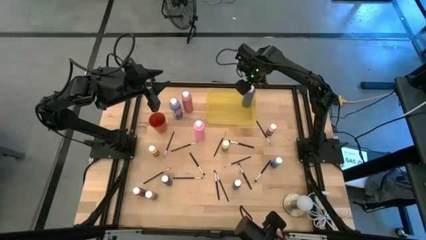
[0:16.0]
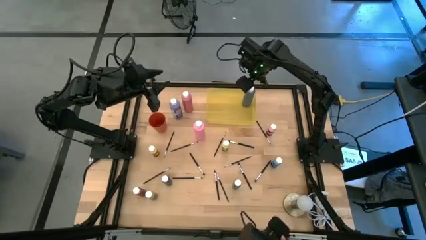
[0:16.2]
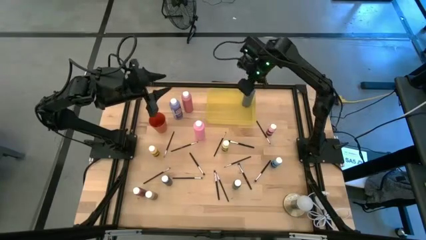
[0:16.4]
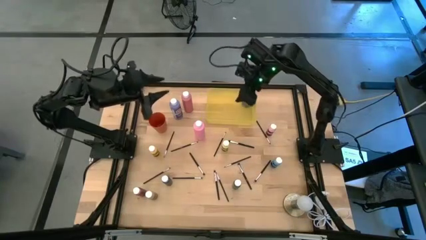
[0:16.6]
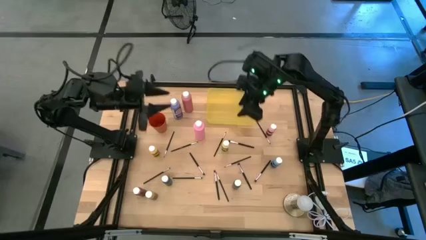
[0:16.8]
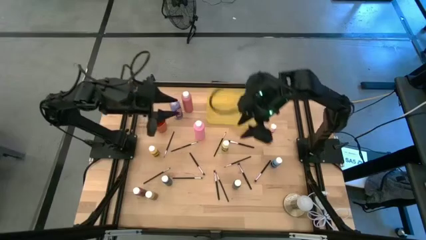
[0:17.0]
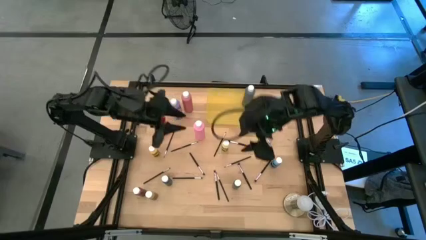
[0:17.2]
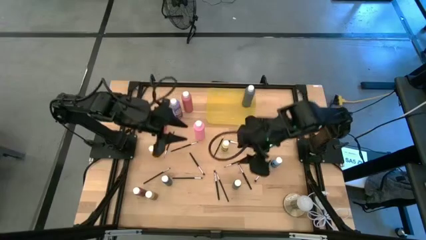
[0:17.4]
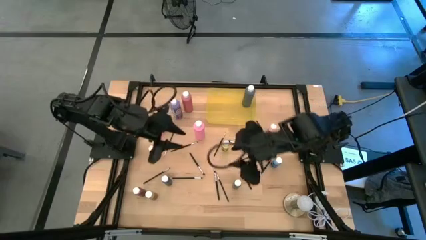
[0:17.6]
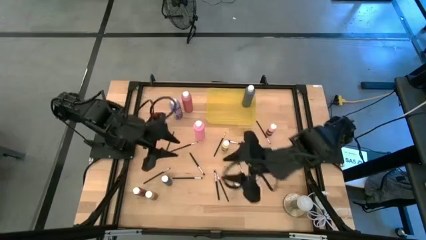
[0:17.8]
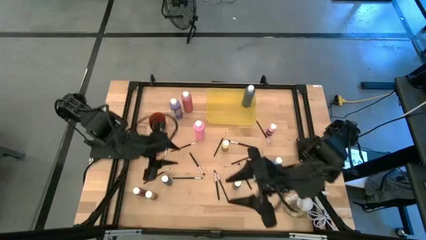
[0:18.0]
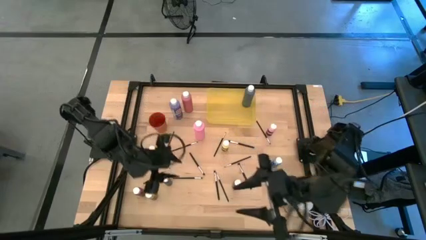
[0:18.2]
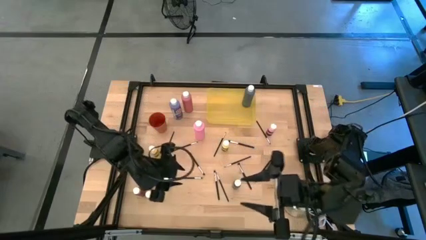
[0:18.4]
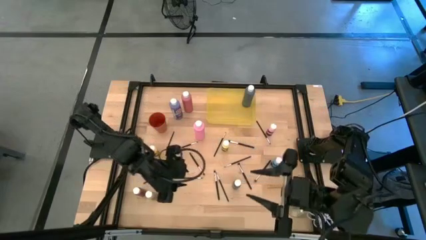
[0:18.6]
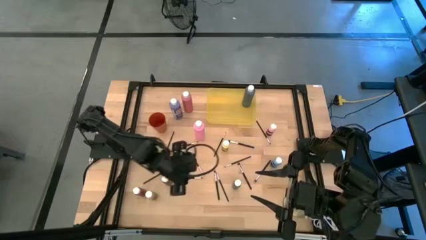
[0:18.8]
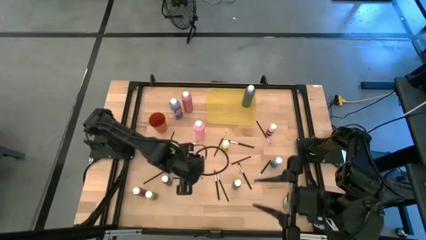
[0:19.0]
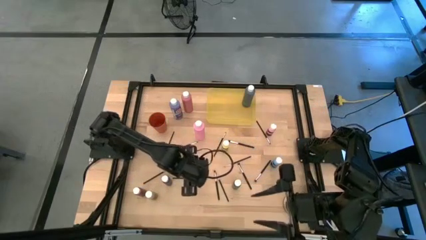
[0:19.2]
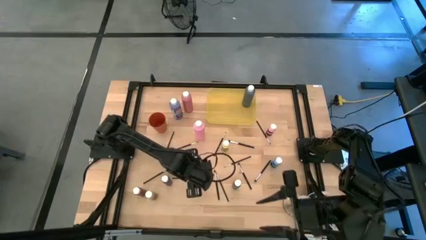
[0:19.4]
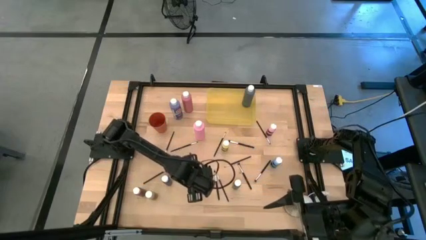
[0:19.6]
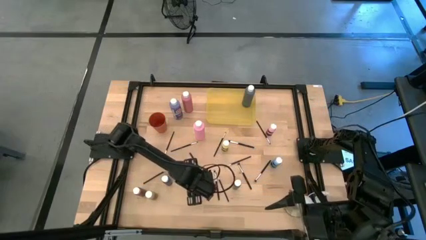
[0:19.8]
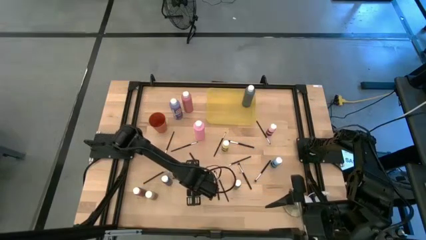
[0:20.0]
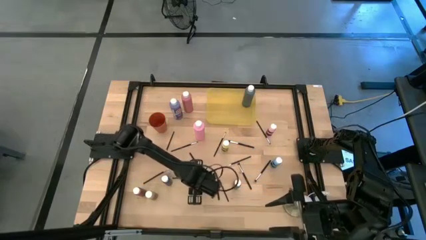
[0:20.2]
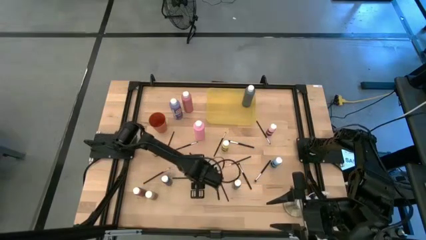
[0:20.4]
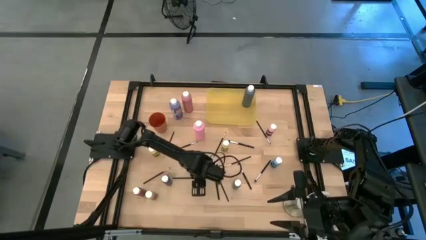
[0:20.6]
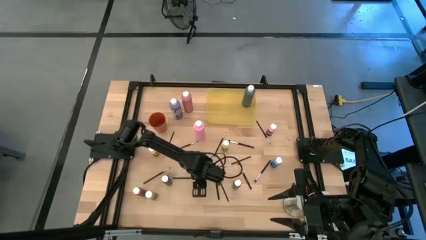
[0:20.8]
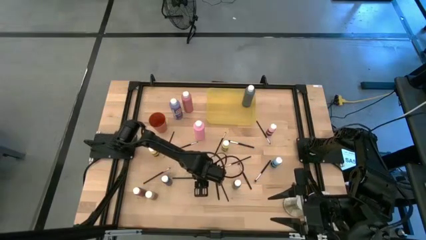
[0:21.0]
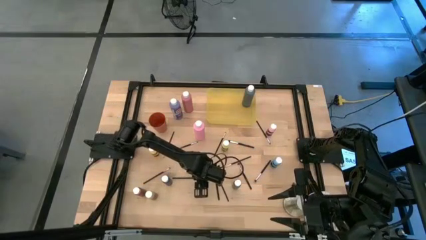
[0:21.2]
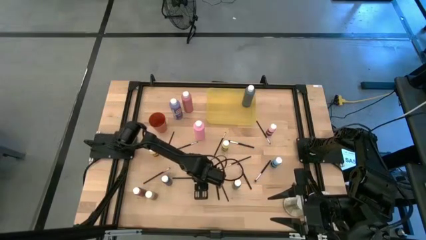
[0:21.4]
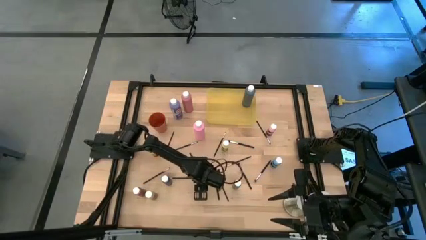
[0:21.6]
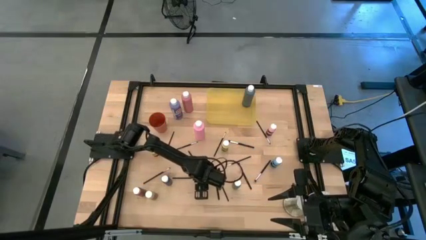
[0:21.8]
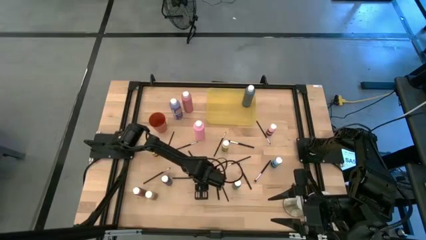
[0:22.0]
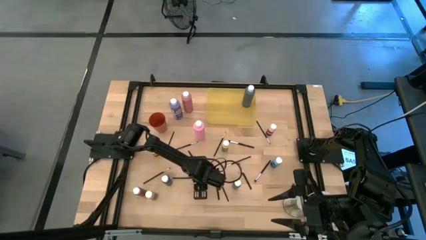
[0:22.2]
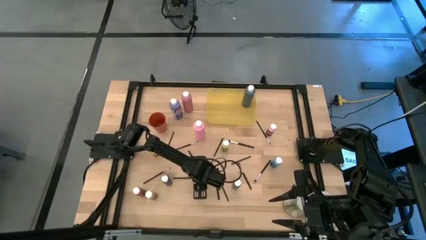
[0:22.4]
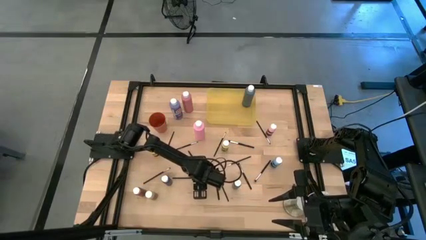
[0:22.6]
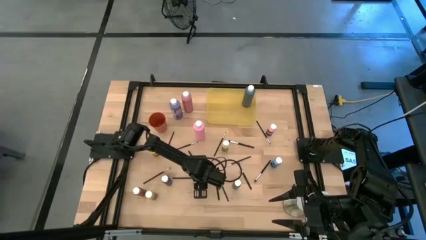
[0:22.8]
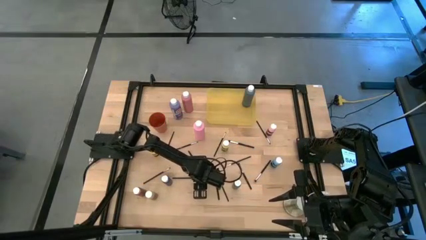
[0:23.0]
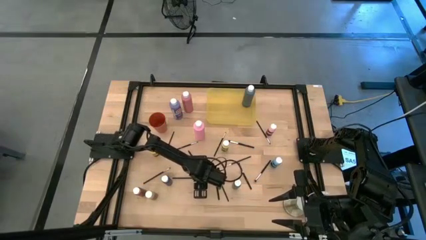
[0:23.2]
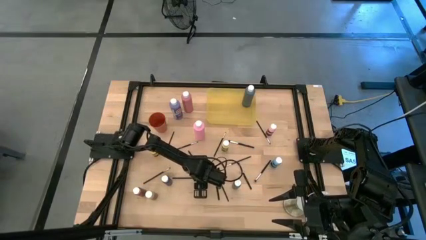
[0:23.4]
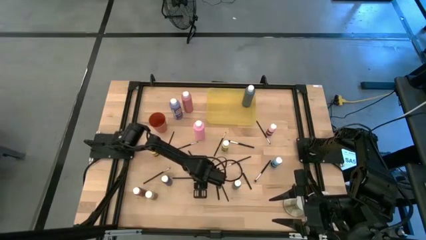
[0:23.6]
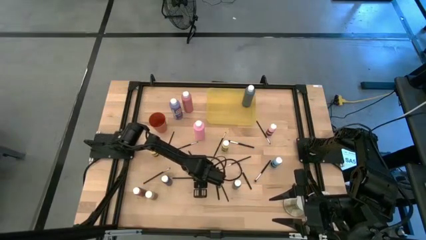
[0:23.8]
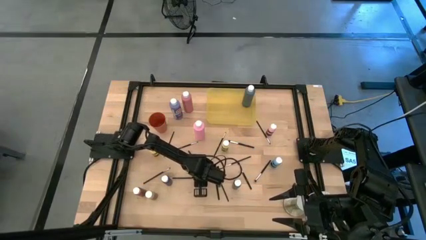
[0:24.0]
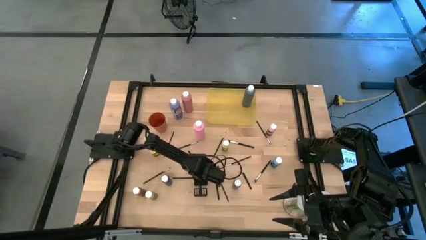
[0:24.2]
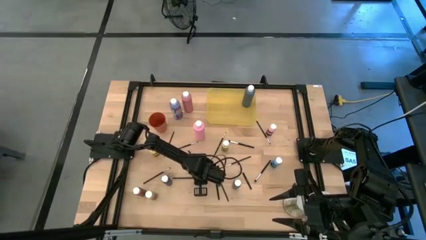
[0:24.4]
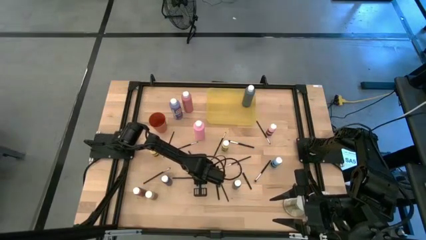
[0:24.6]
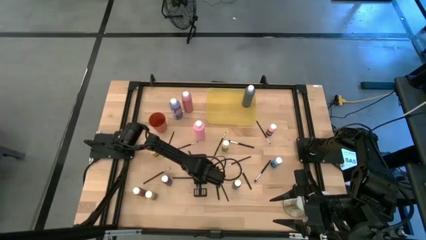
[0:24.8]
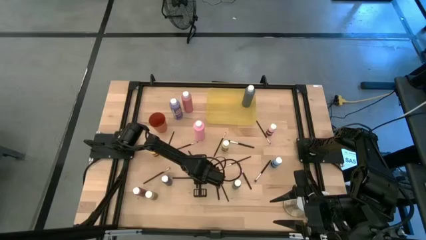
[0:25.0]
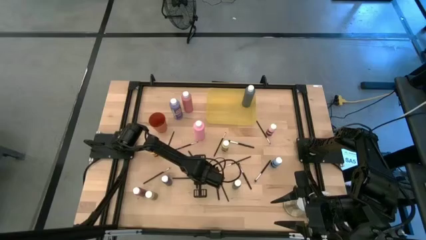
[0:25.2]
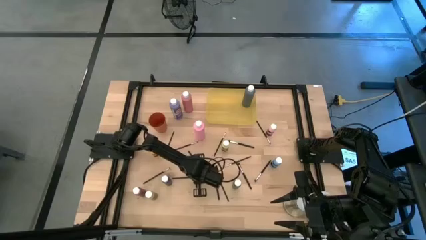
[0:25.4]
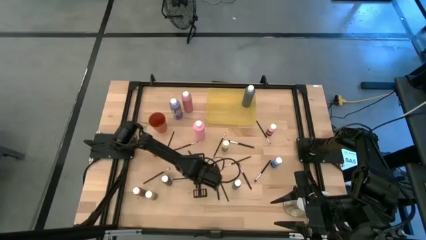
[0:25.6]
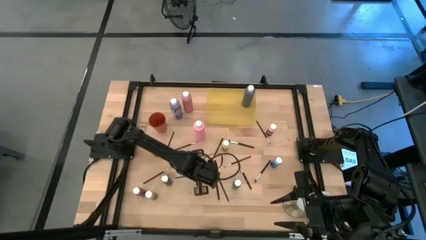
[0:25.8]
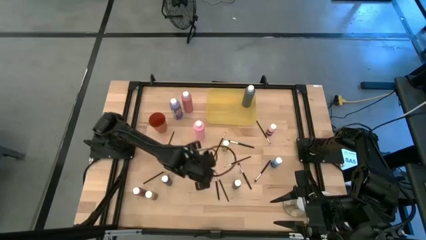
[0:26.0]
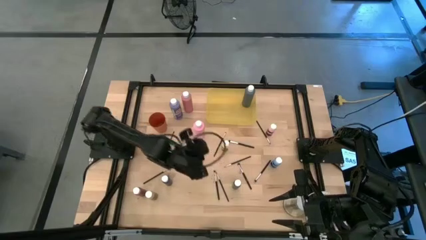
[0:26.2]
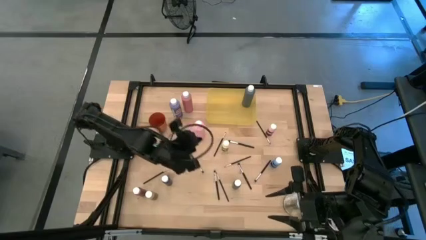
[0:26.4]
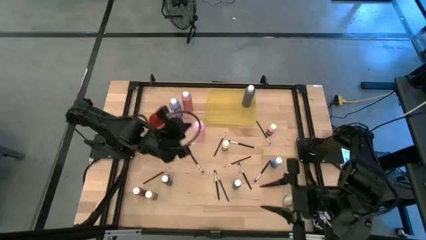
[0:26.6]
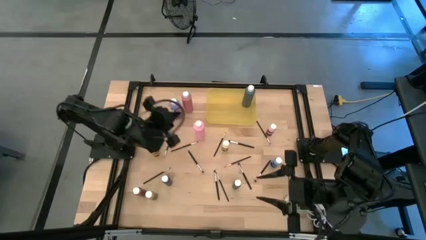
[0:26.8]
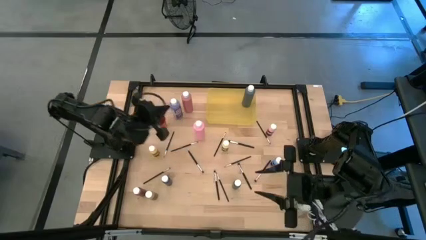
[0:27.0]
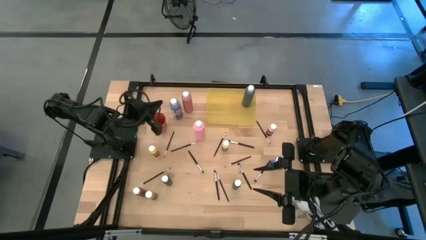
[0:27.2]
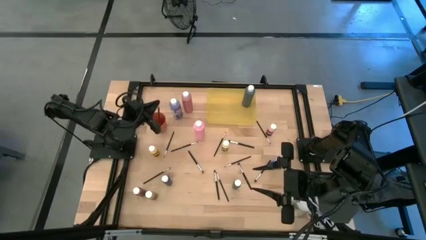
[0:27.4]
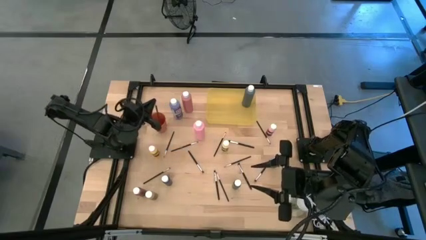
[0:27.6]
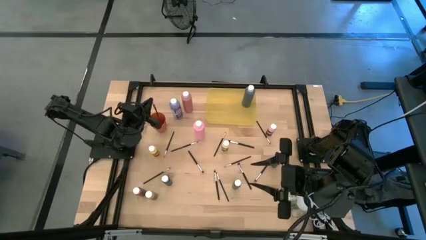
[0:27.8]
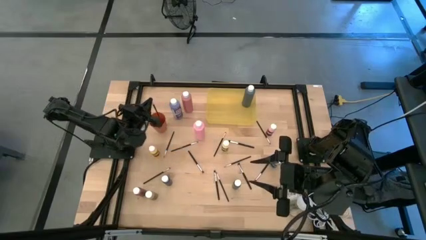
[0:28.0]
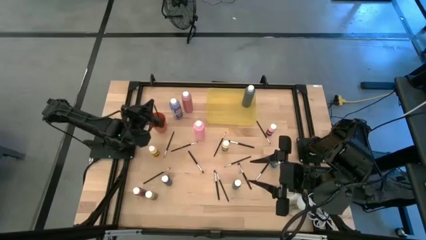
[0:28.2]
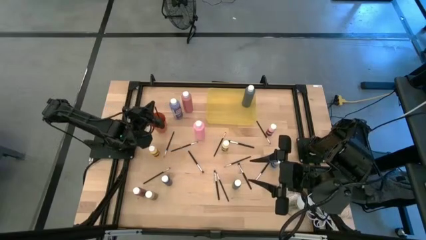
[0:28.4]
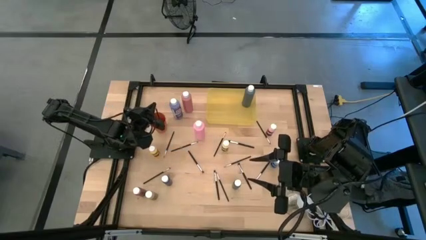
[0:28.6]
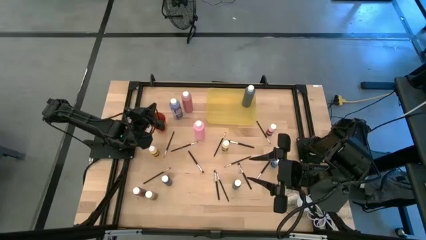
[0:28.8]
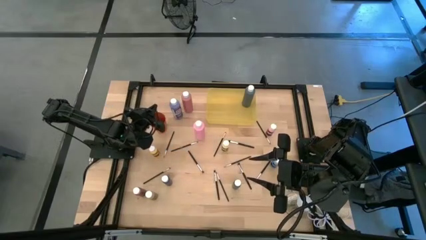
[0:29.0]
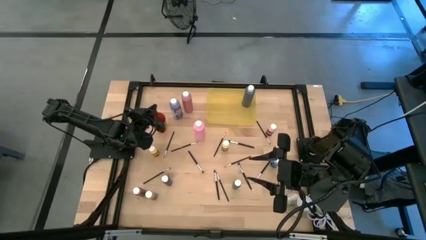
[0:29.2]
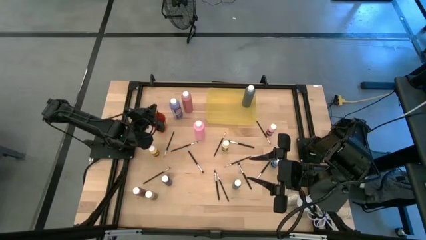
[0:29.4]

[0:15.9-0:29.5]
Task: Pick & Place Paint Supplies
Put the silver paint brush into the orange cup

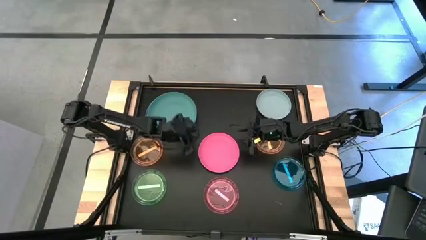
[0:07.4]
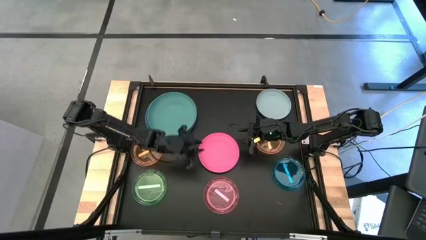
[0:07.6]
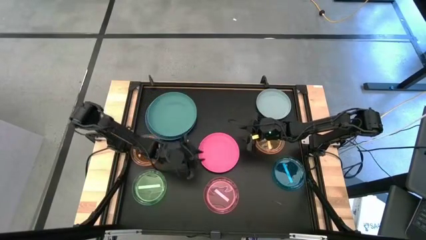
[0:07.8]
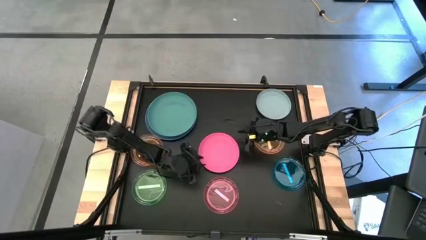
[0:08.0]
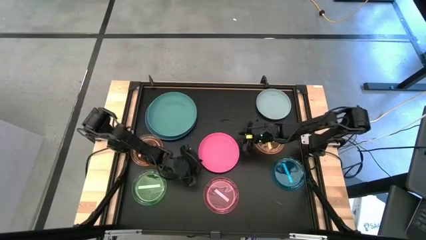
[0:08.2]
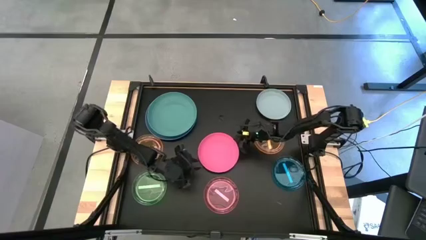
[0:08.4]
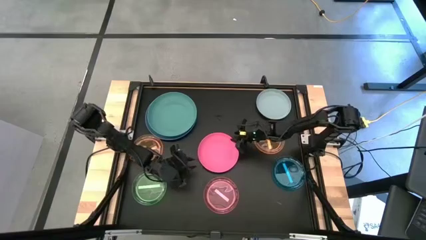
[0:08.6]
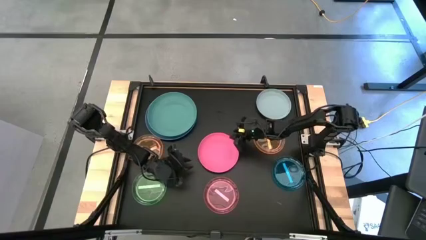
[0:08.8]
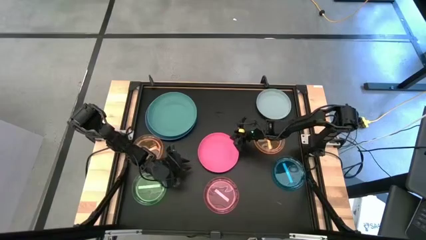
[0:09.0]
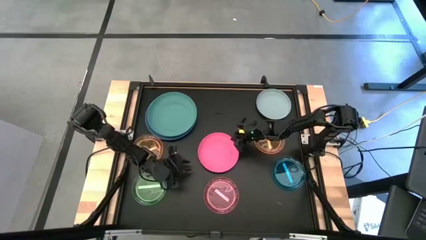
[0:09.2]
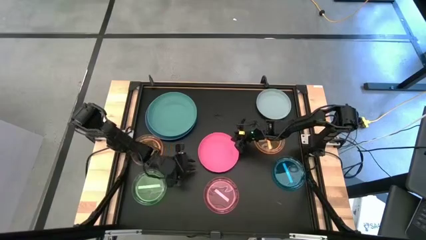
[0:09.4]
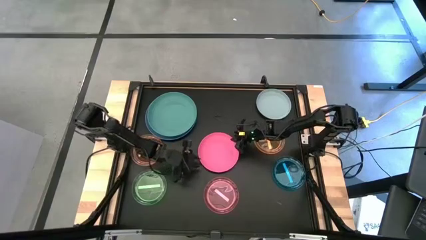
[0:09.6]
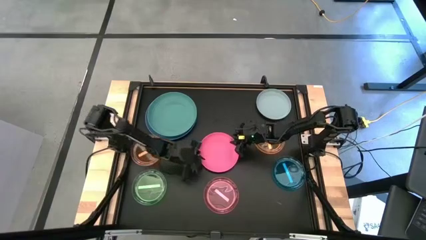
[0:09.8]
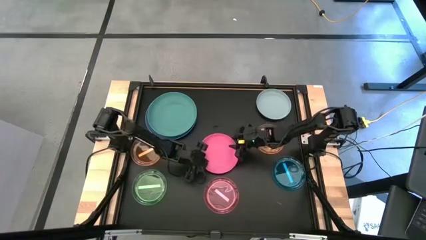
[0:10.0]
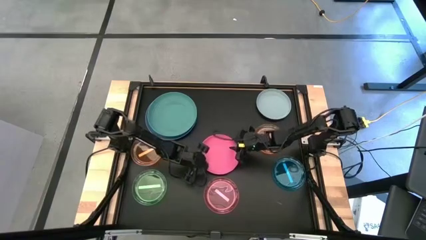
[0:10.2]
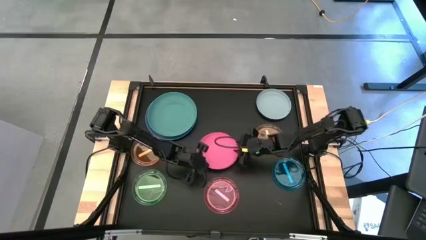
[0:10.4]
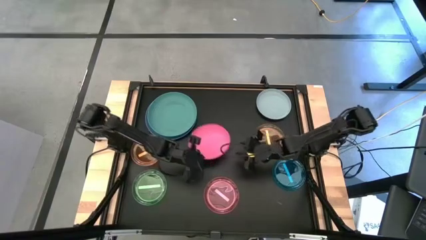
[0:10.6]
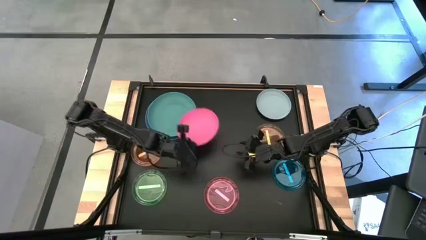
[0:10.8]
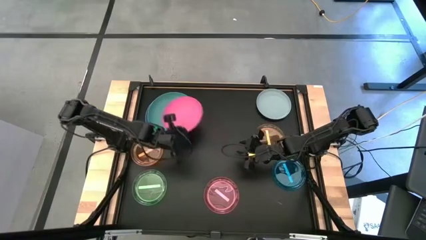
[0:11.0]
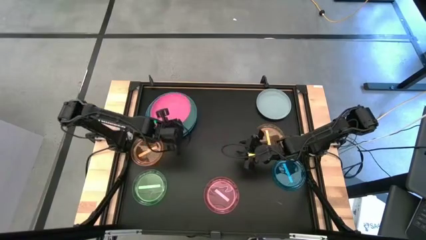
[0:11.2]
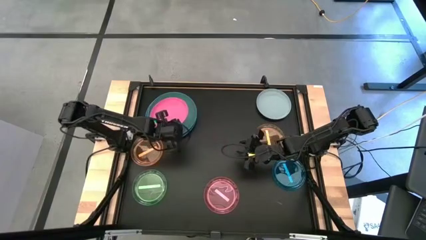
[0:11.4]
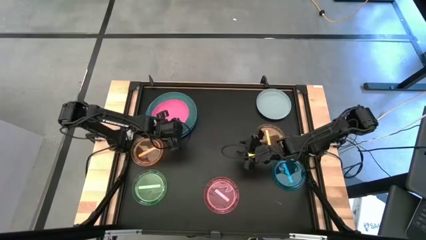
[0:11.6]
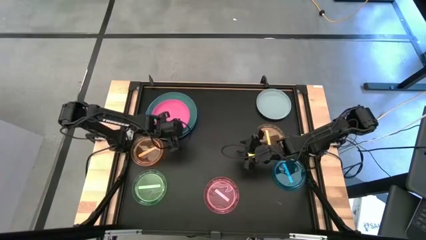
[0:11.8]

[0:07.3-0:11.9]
Task: Stack plastic plates
Stack the pink plate on the green plate
